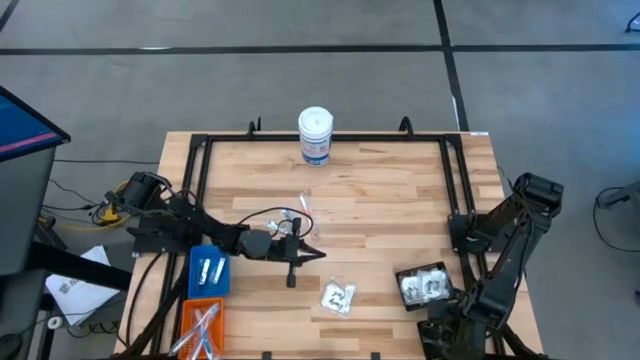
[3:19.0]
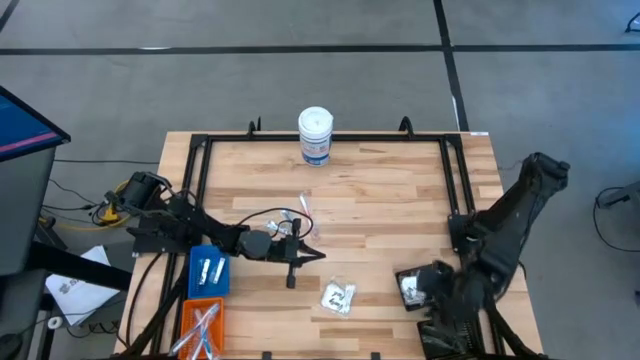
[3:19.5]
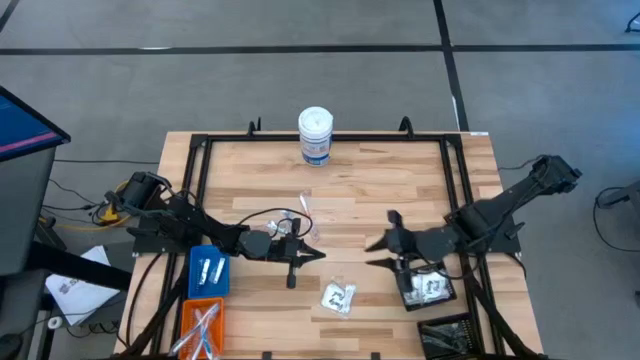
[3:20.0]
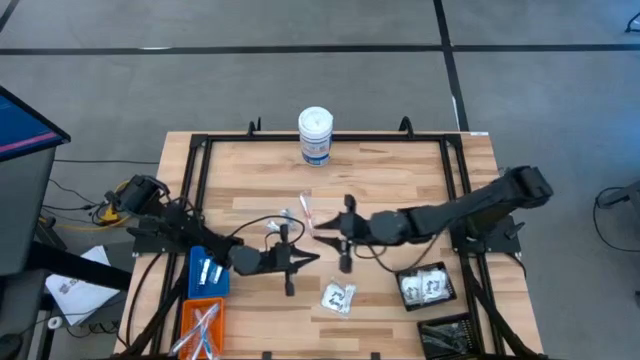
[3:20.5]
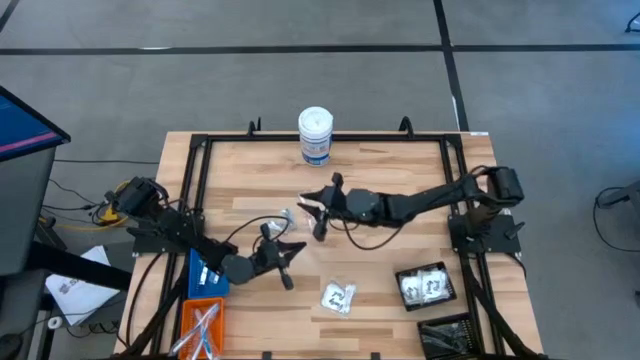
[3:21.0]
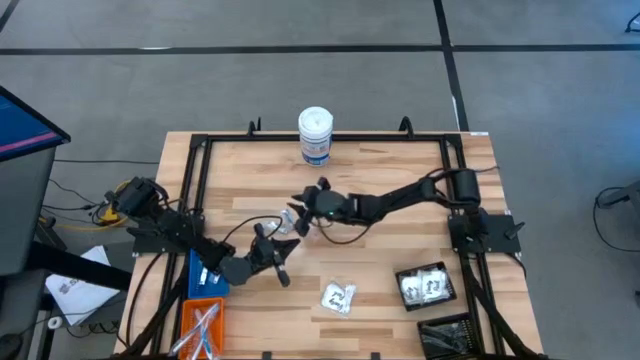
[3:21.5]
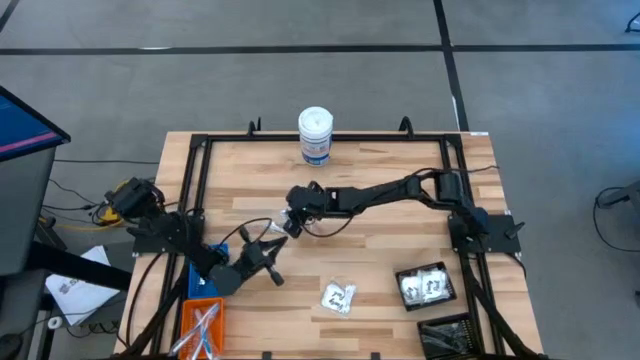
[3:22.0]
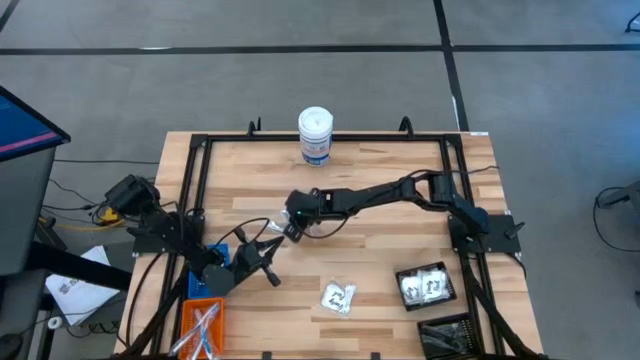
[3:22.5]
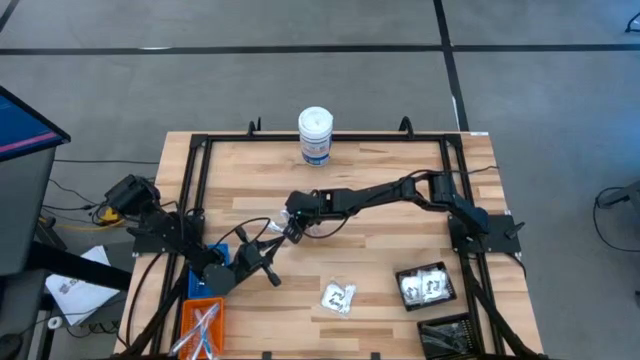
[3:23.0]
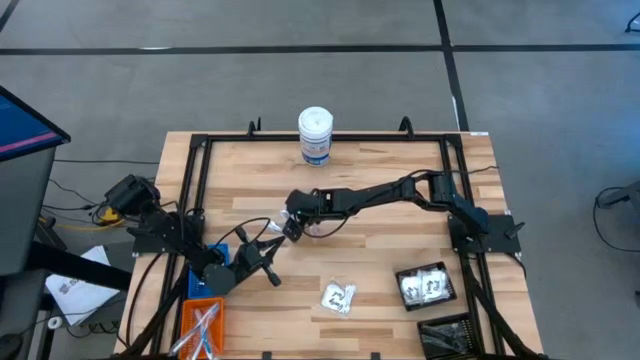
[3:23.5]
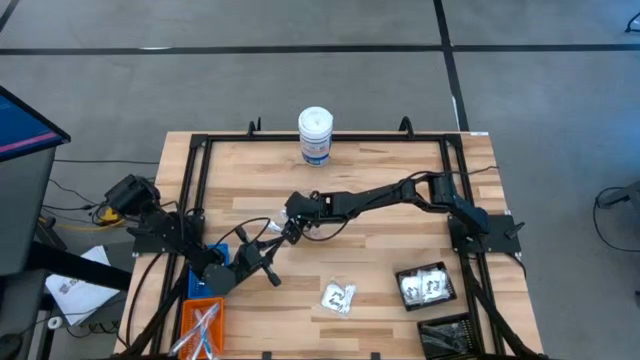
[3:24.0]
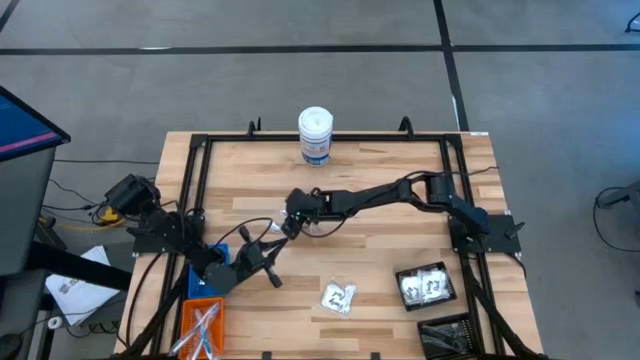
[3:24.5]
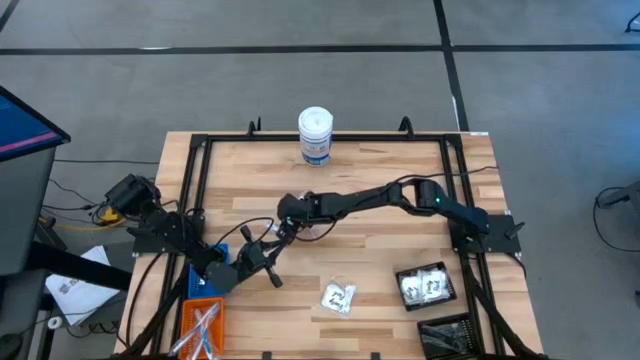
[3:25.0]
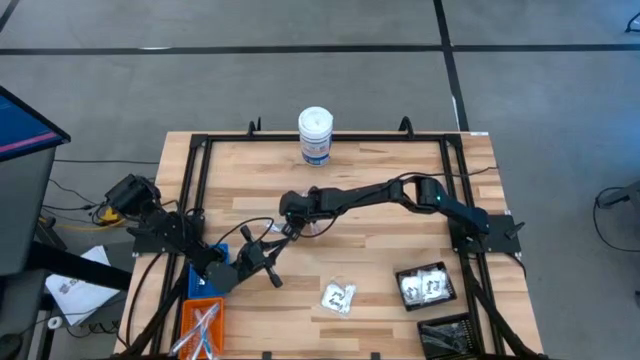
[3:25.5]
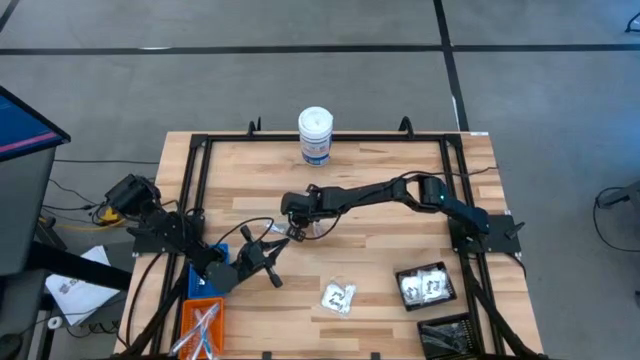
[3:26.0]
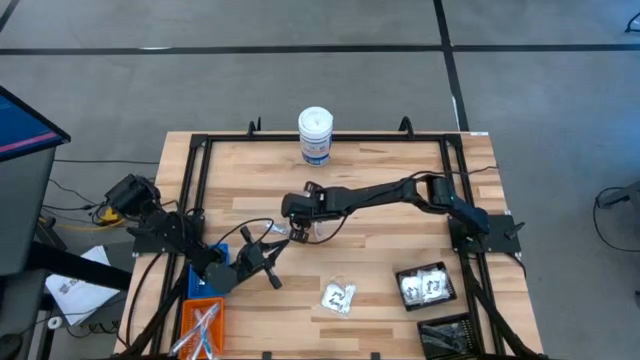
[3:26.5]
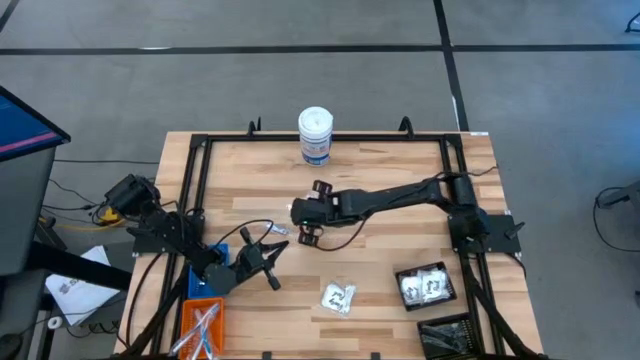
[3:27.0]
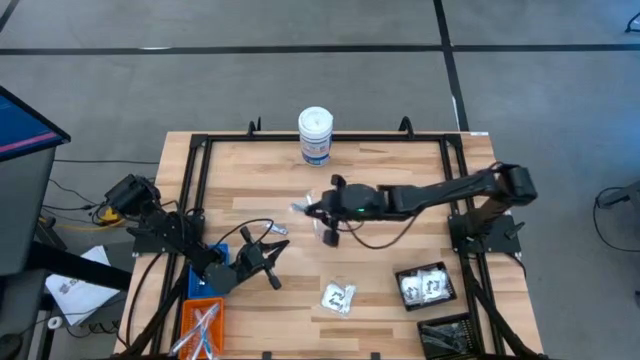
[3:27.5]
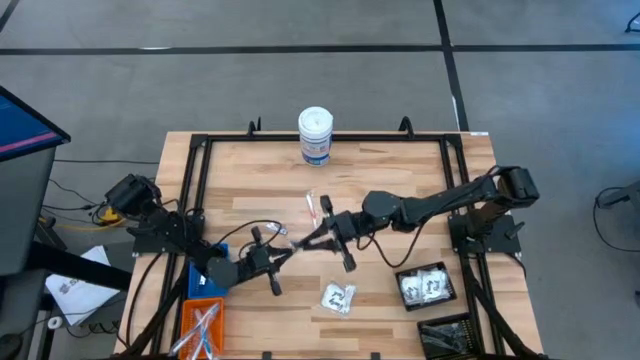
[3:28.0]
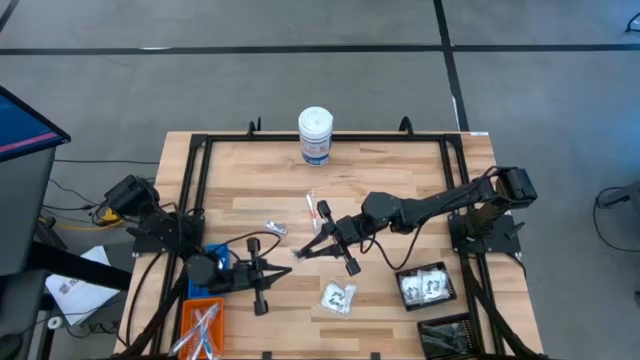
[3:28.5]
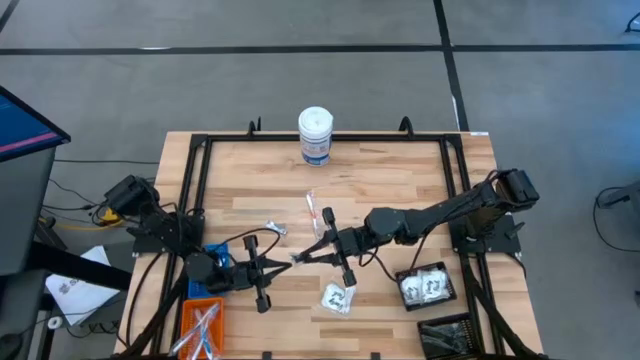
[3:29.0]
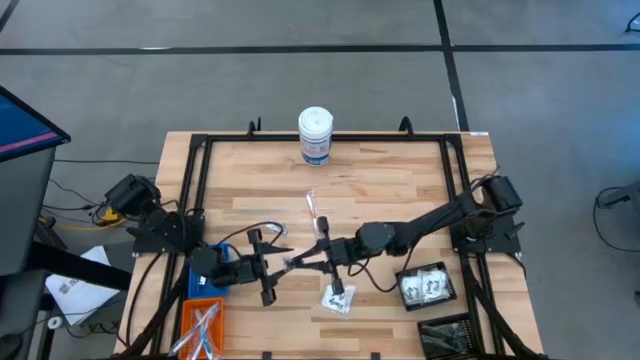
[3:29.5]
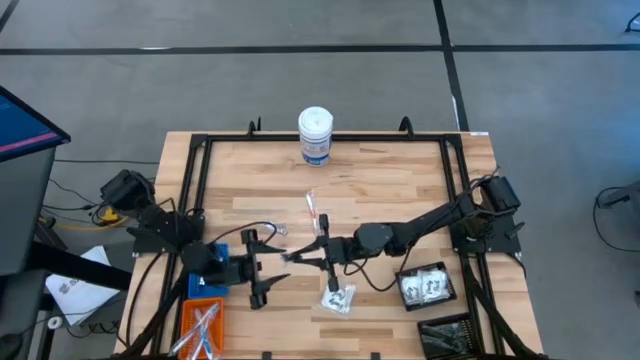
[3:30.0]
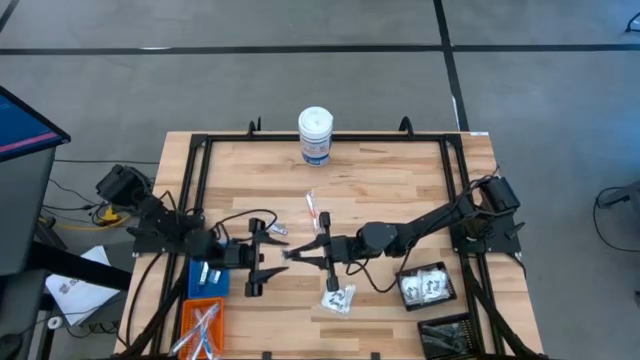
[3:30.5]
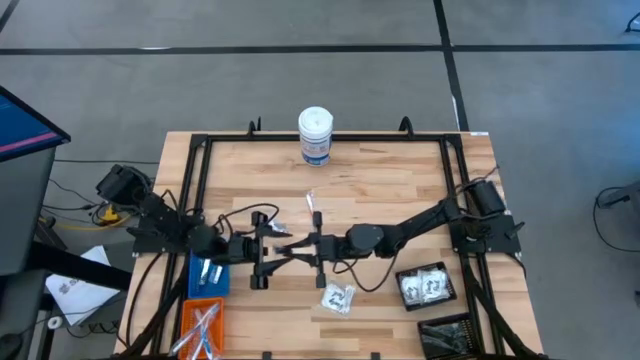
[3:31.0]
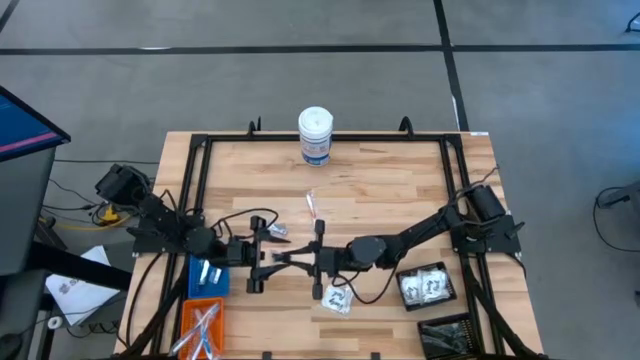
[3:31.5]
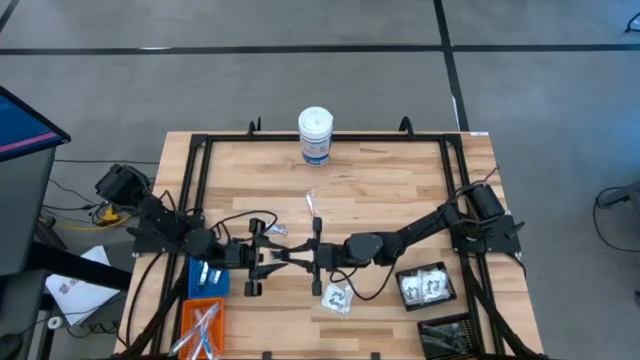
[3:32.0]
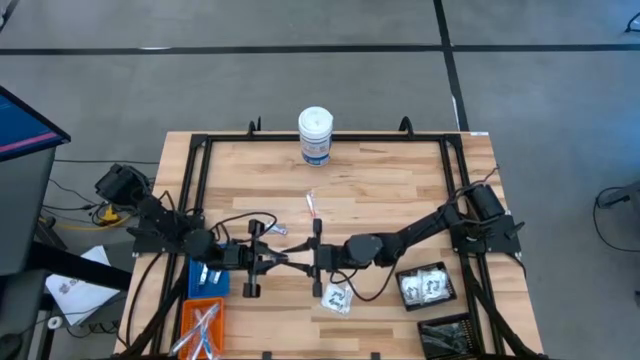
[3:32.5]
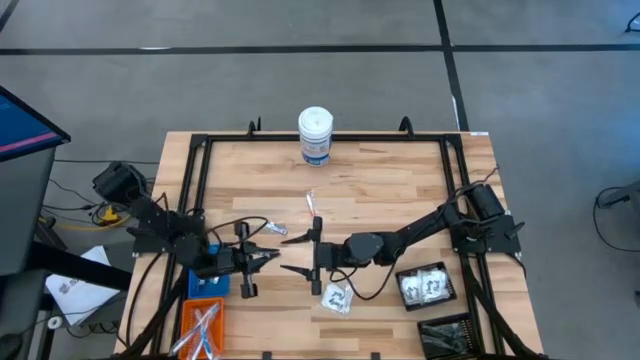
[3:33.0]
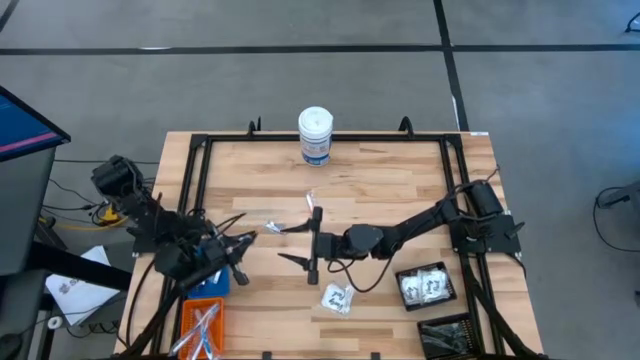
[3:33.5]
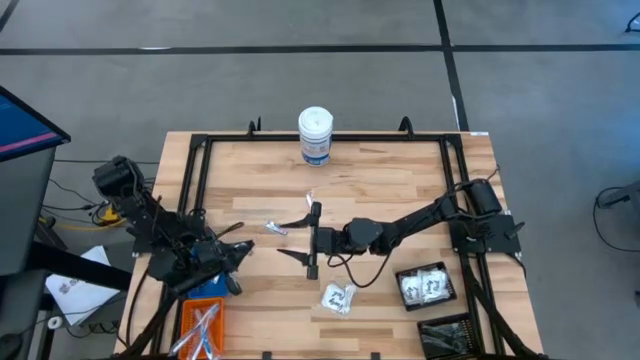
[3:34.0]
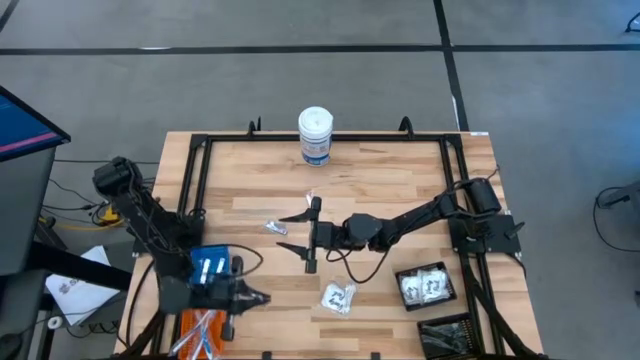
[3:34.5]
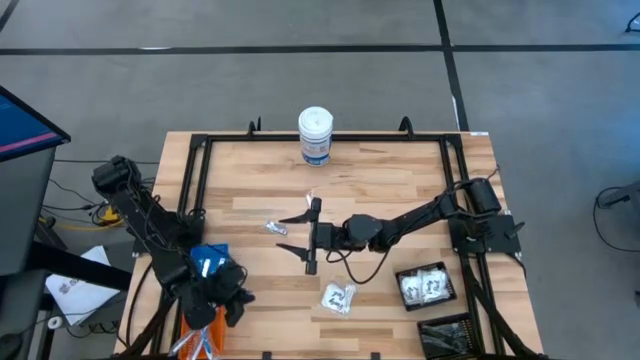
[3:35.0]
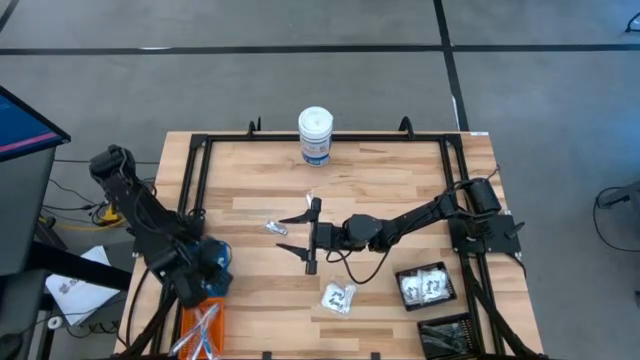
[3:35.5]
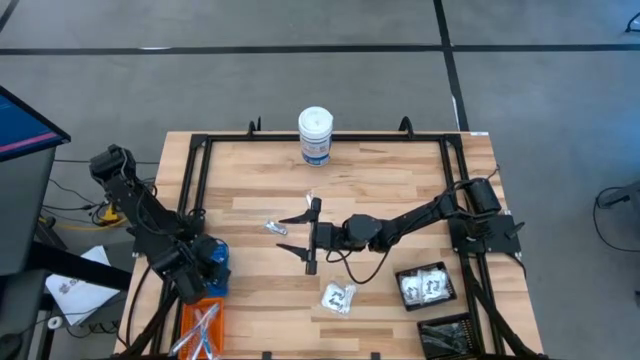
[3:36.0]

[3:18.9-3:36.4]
Task: Pick & Place Travel size toiletries
Put the silver nail clipper into the blue bin
